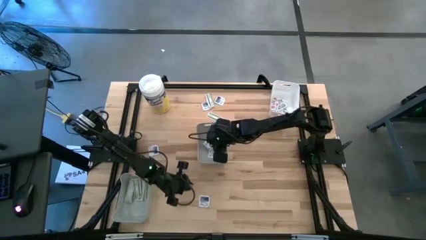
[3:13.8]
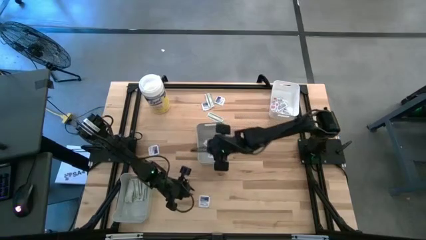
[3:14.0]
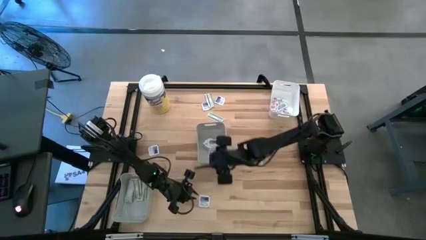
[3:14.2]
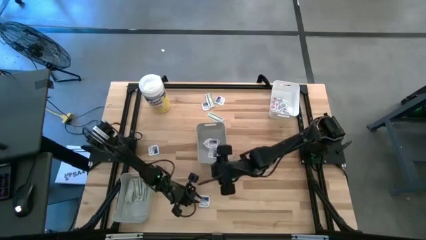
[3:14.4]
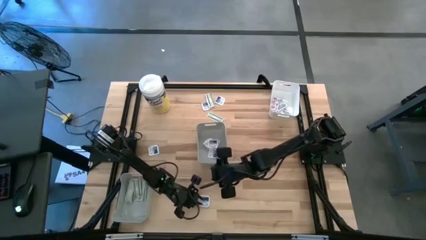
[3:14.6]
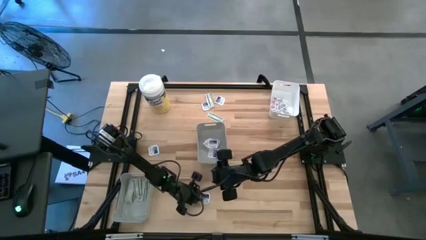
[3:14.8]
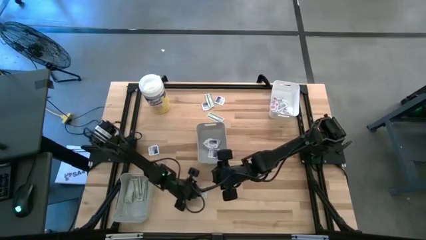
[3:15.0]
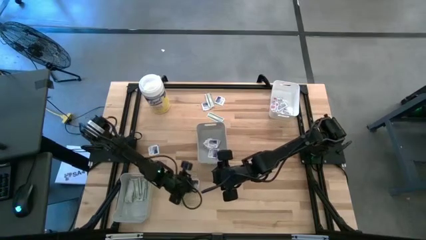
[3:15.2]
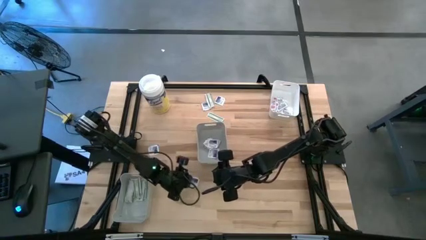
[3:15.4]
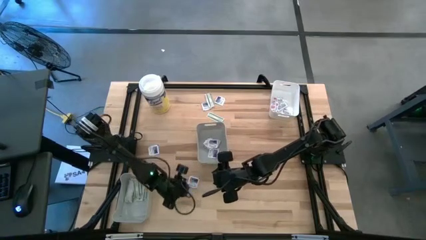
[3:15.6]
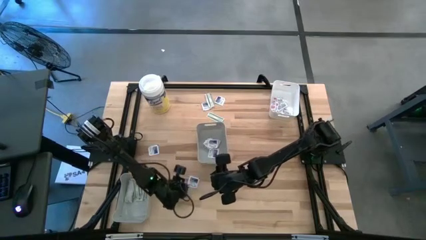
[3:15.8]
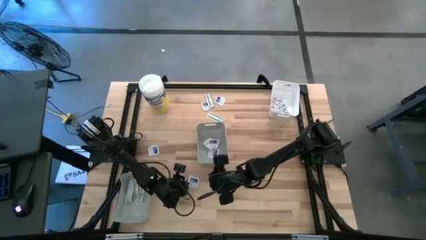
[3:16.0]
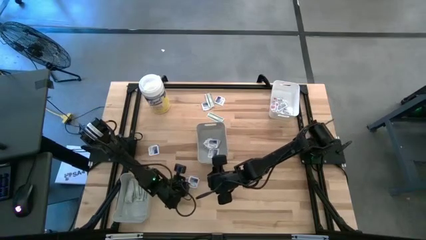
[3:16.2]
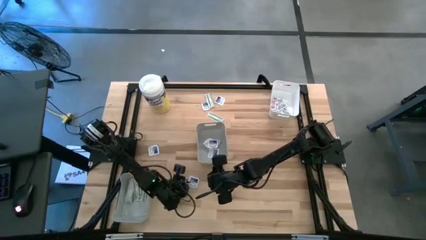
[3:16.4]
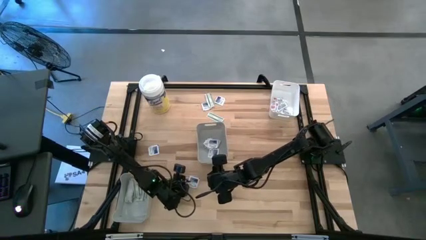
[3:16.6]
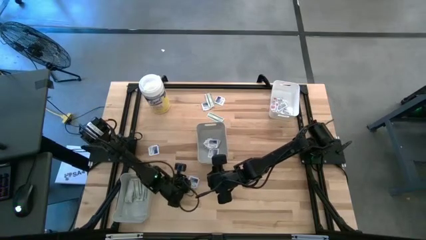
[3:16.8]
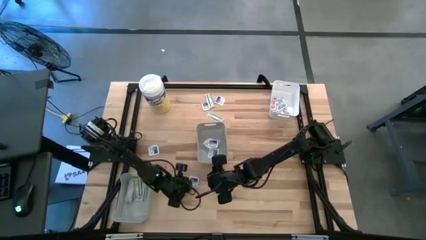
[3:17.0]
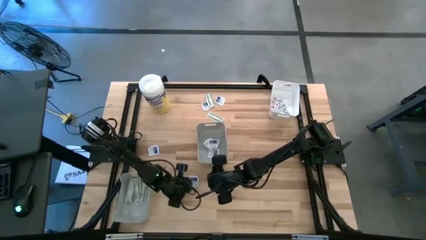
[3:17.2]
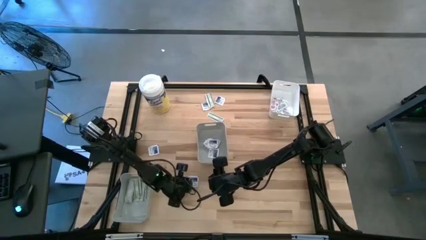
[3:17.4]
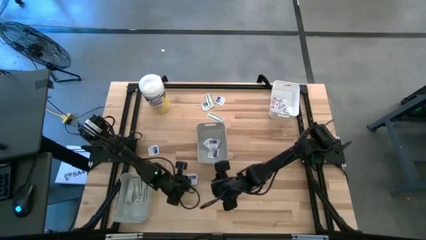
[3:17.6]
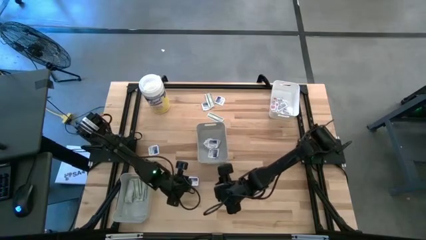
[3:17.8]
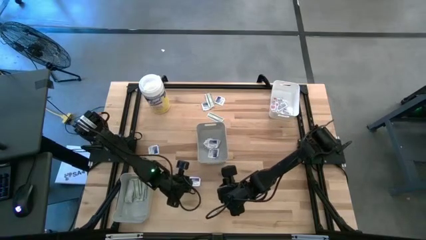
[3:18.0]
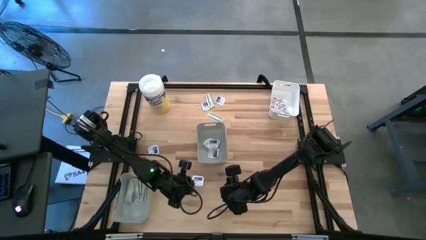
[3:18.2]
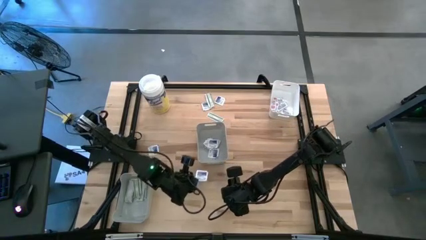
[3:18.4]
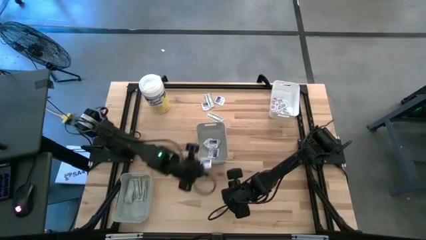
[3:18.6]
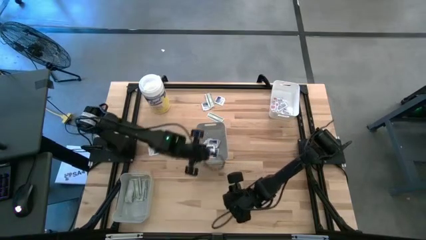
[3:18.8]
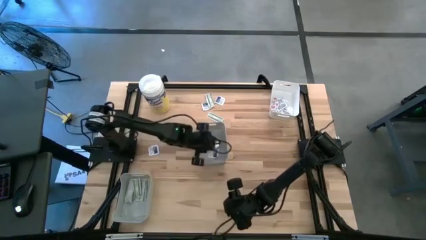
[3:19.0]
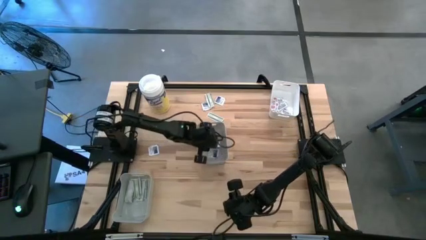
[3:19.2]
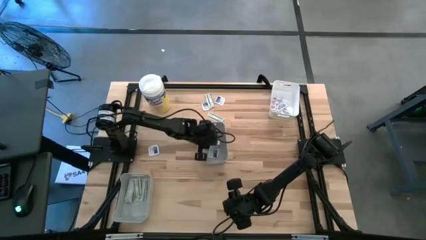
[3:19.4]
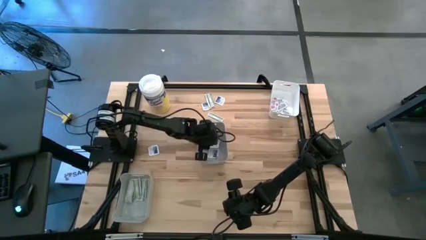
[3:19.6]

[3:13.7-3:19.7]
Task: Pick & Place First Aid Supplies
Put the blue pad into the middle gray bin

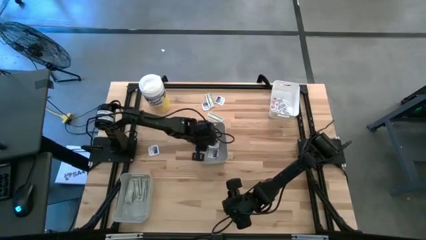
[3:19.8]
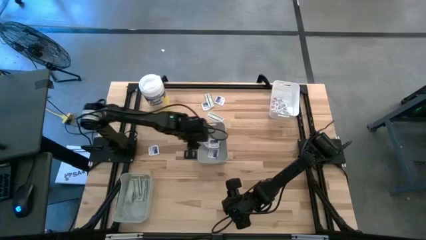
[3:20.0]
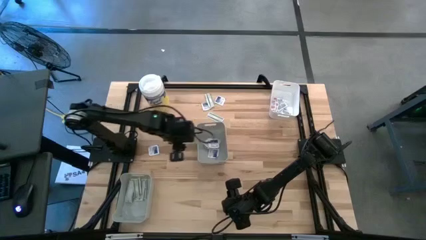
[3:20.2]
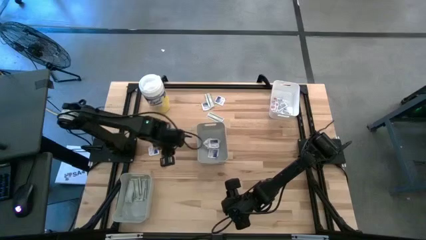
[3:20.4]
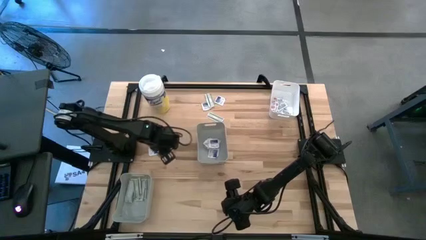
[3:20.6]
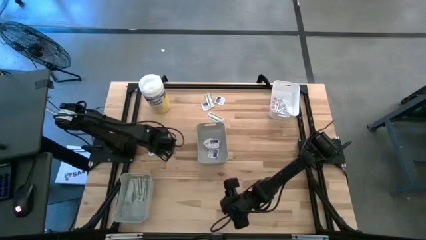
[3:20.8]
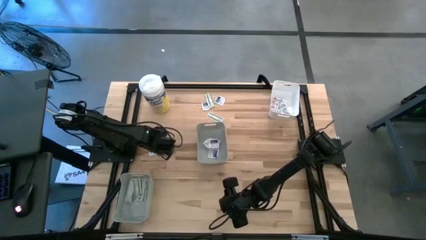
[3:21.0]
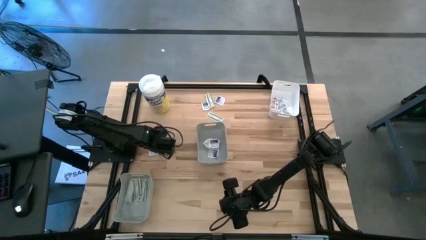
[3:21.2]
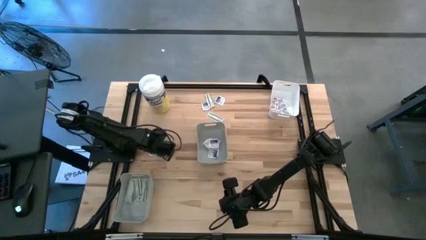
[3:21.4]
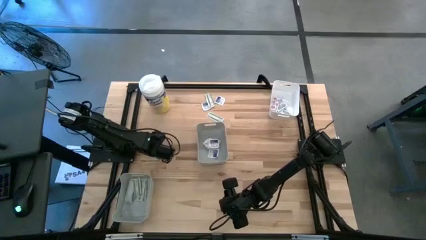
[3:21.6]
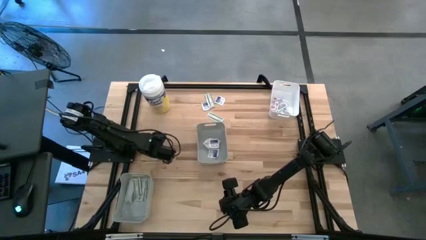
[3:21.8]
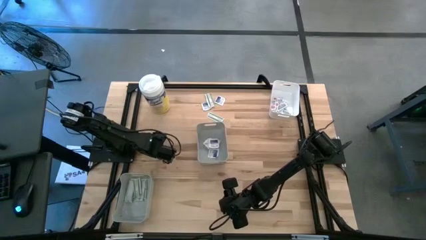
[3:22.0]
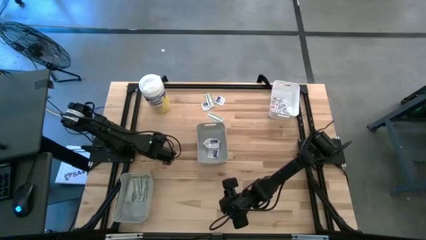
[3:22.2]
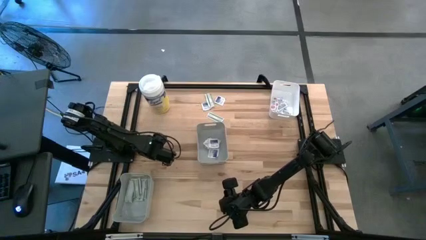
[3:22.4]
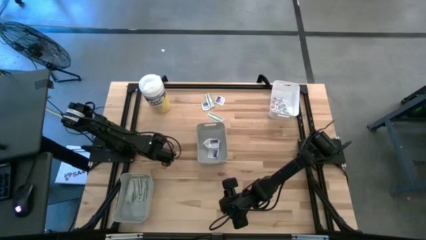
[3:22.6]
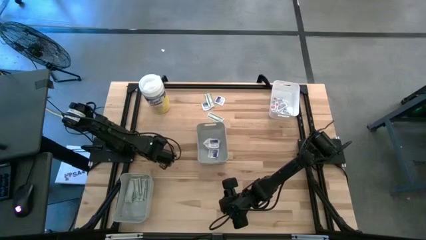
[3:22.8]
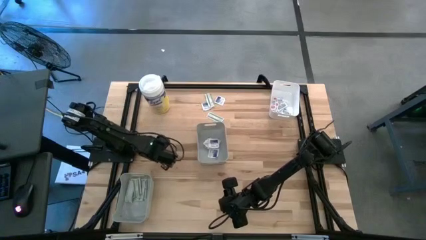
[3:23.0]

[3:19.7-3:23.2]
Put the blue pad into the middle gray bin

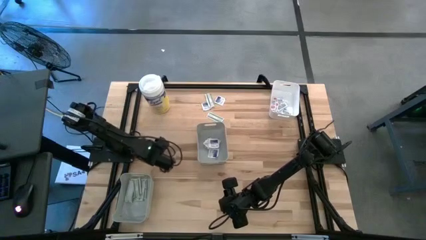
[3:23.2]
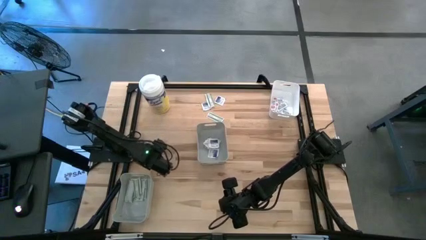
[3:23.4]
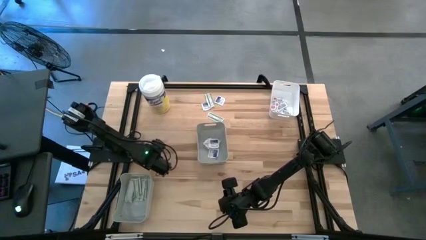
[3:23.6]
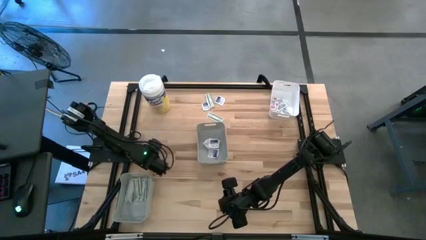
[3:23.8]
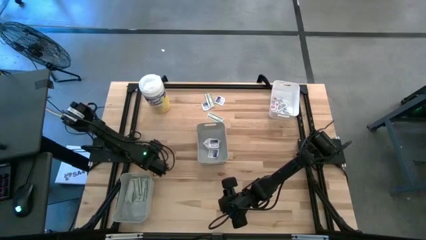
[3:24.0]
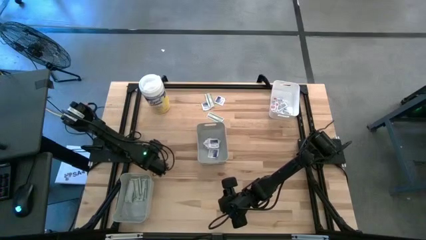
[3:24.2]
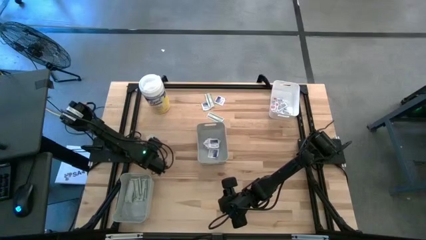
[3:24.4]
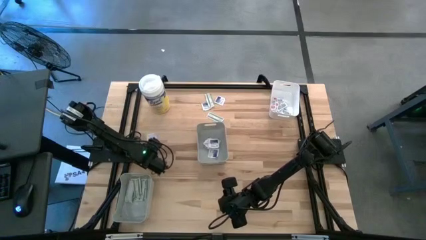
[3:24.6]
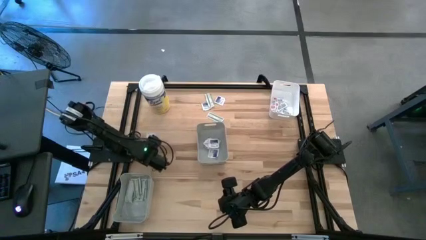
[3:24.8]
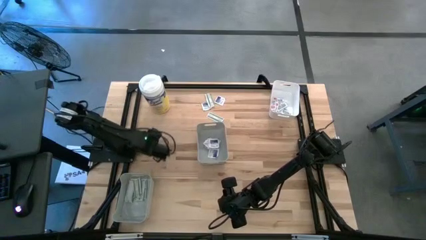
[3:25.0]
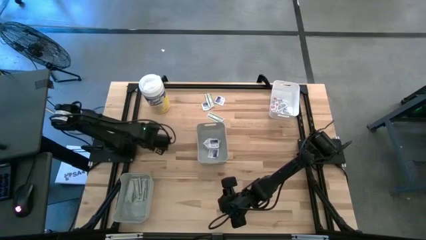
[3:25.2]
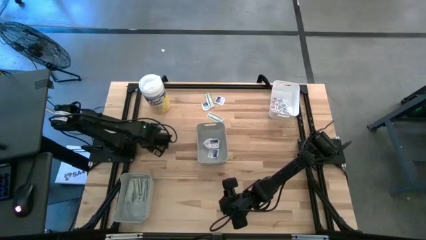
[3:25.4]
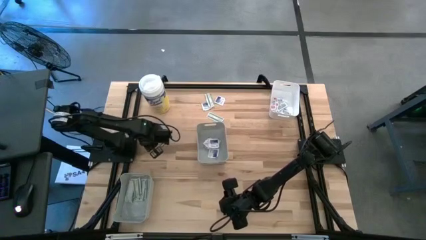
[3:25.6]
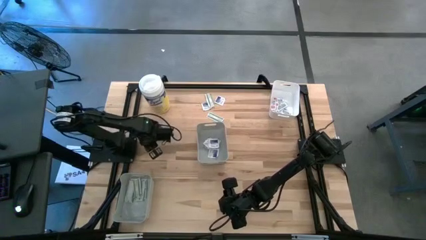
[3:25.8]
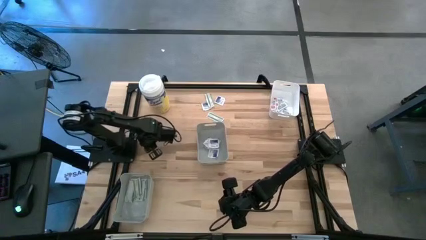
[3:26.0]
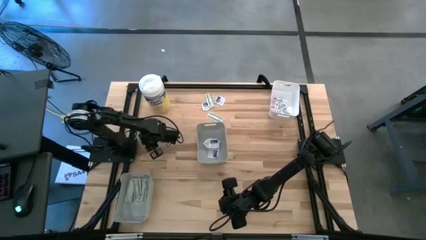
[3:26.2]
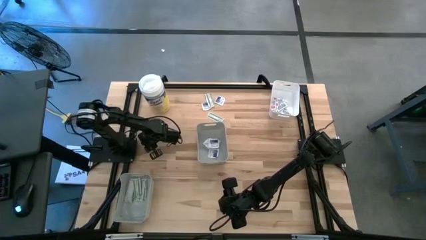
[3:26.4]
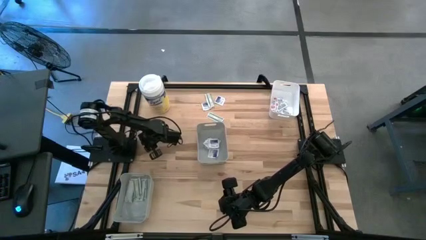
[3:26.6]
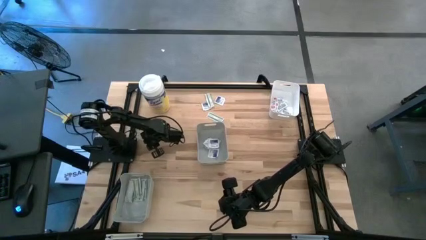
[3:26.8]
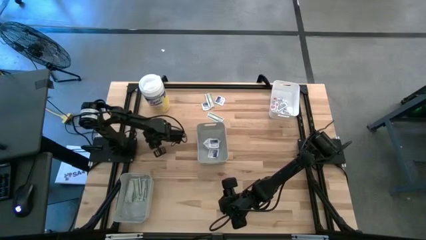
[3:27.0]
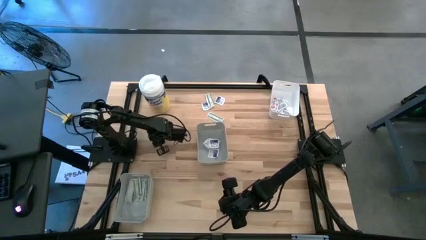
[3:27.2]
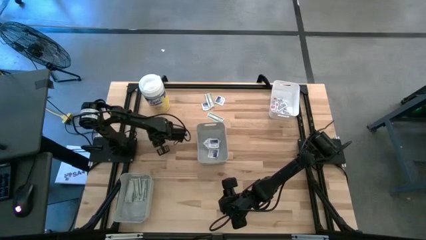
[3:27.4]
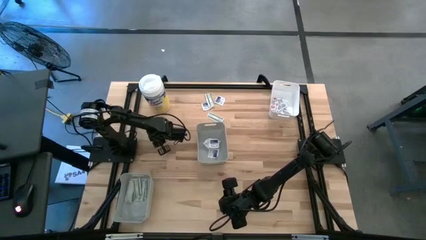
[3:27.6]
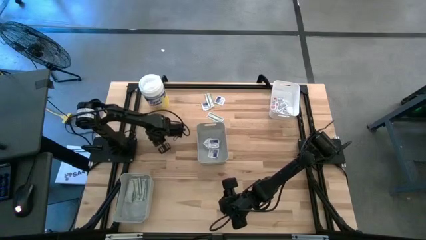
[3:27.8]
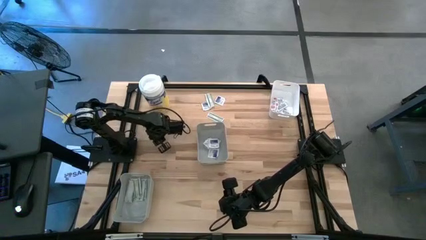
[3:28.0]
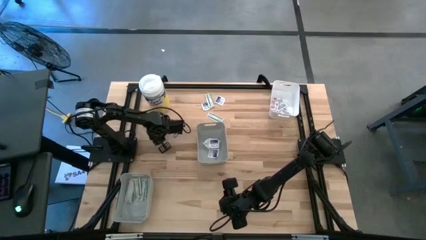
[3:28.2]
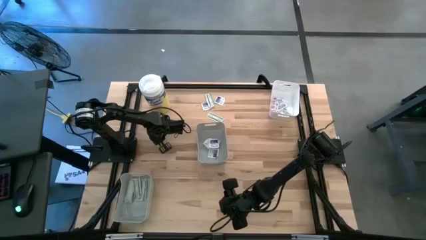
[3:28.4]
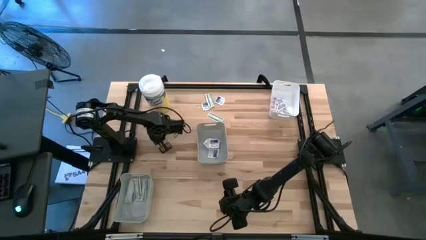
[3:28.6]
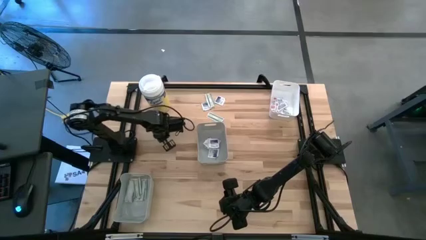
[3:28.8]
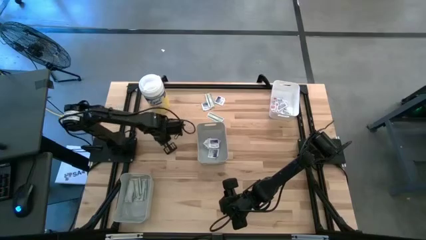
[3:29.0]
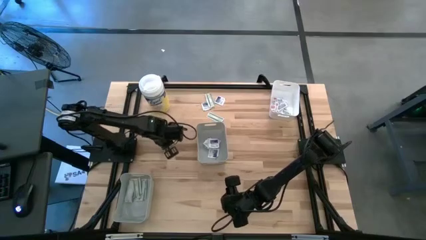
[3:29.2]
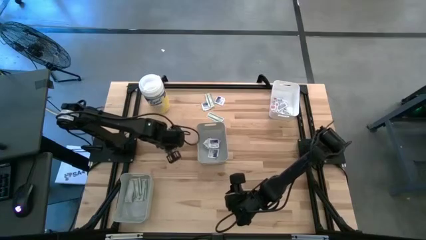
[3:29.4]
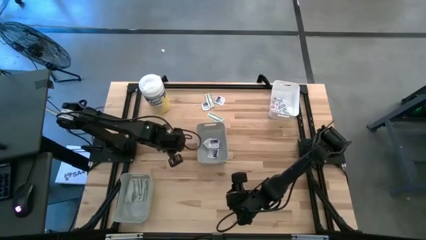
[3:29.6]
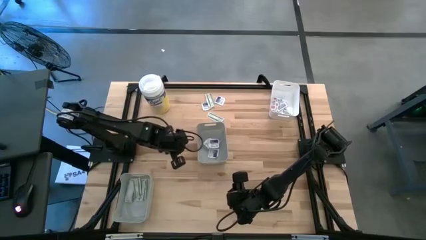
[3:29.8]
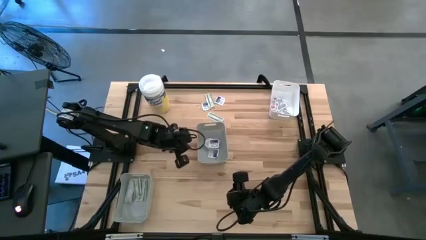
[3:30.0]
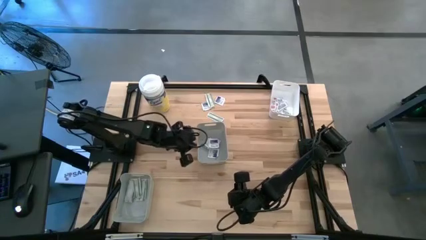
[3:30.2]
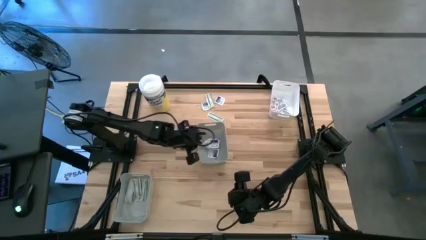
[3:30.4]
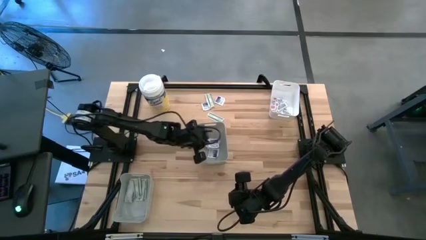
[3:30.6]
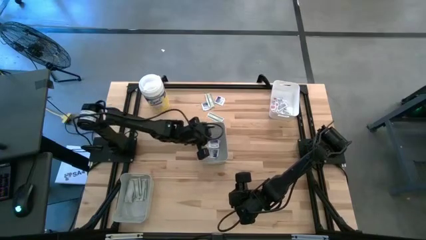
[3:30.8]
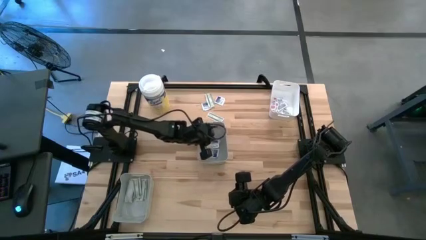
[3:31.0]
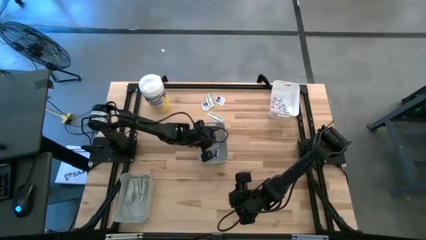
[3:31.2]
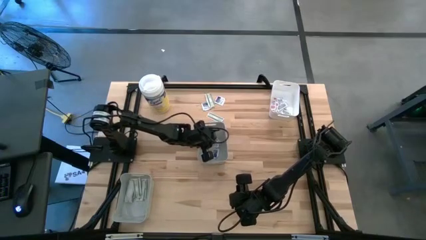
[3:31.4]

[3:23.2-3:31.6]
Put the blue pad into the middle gray bin
